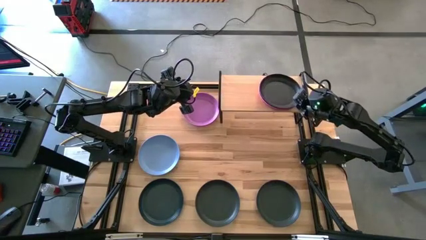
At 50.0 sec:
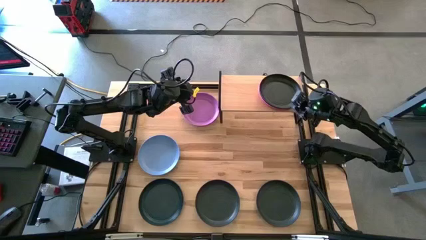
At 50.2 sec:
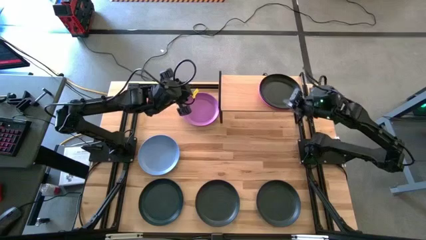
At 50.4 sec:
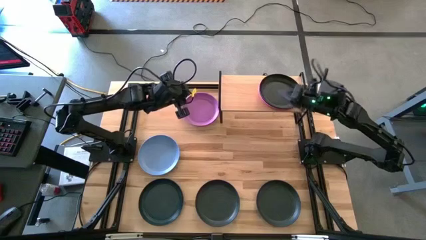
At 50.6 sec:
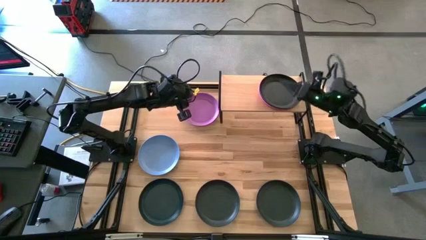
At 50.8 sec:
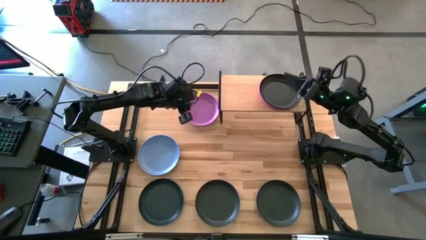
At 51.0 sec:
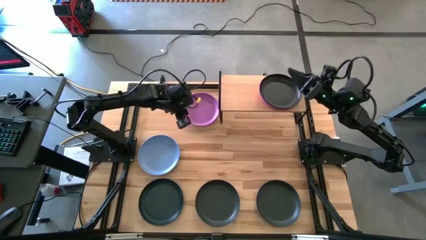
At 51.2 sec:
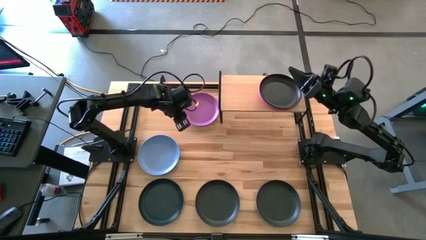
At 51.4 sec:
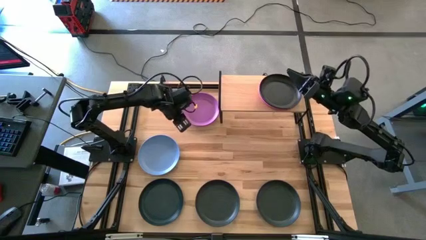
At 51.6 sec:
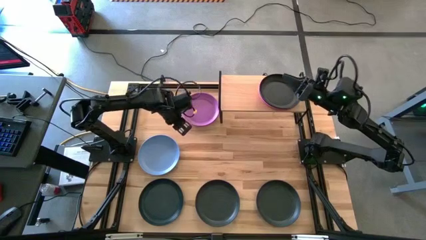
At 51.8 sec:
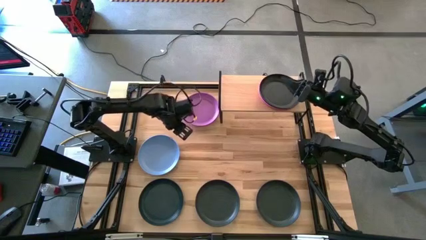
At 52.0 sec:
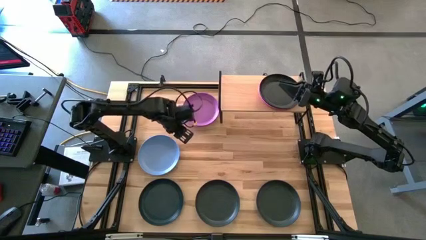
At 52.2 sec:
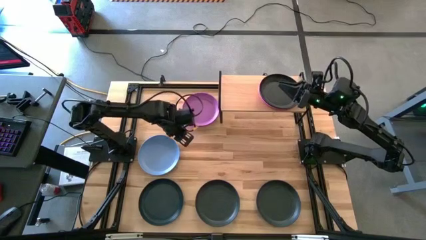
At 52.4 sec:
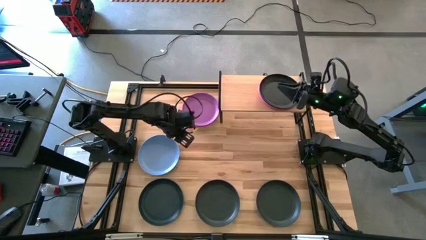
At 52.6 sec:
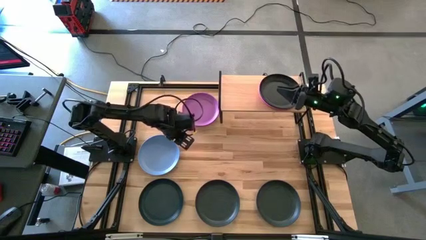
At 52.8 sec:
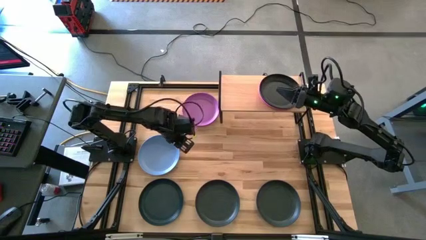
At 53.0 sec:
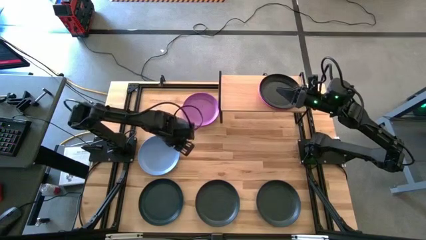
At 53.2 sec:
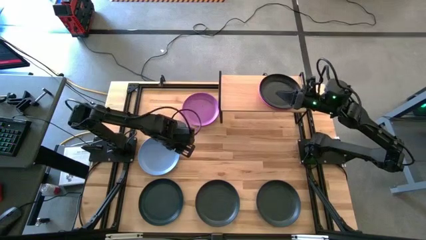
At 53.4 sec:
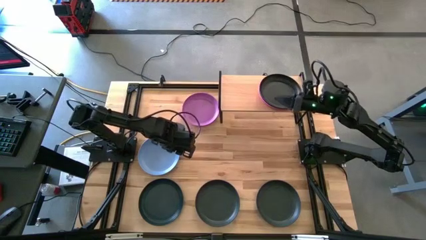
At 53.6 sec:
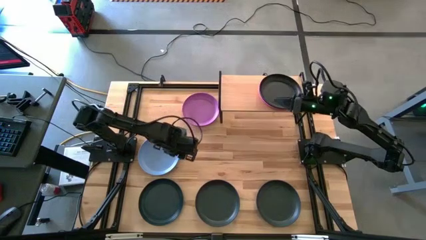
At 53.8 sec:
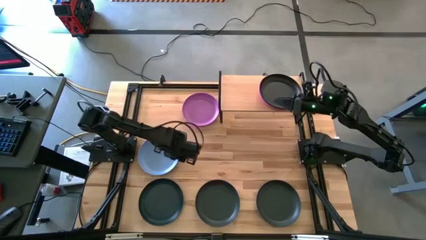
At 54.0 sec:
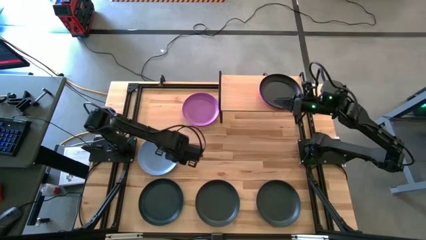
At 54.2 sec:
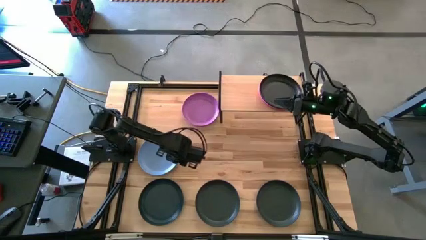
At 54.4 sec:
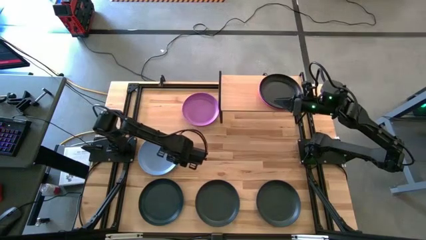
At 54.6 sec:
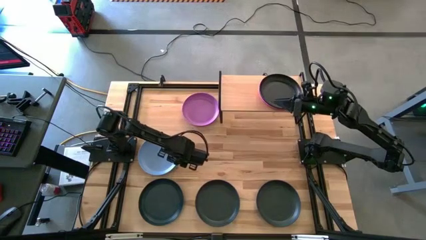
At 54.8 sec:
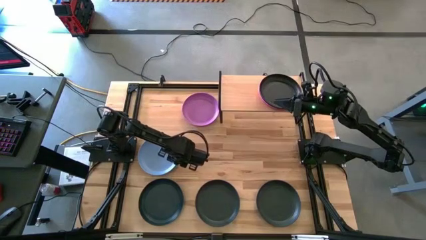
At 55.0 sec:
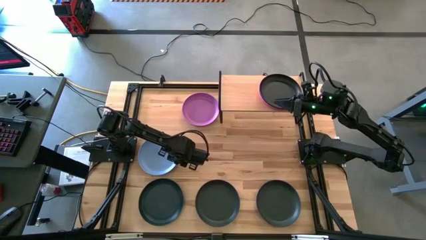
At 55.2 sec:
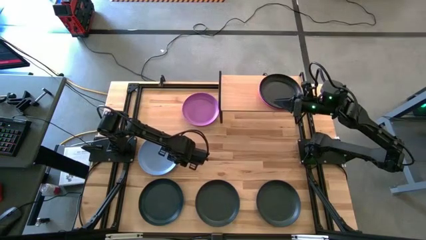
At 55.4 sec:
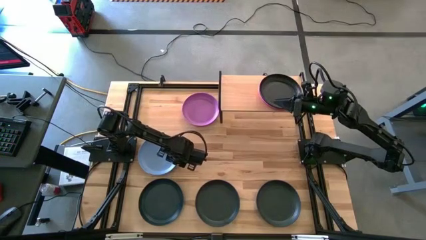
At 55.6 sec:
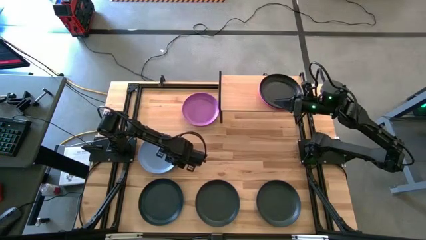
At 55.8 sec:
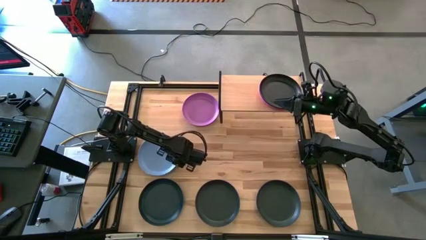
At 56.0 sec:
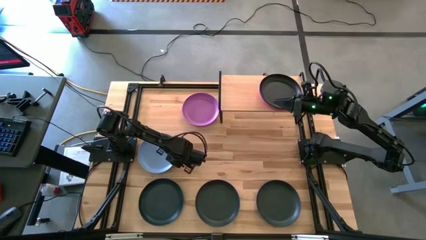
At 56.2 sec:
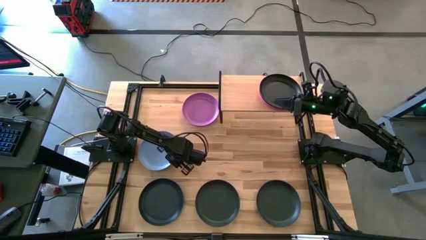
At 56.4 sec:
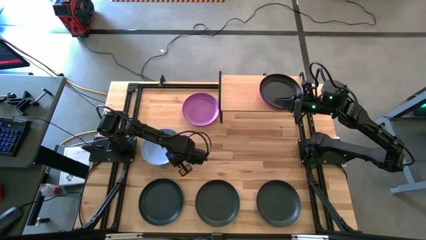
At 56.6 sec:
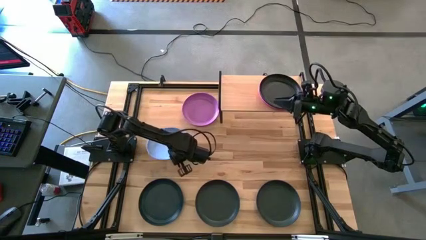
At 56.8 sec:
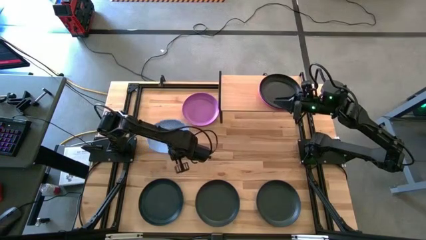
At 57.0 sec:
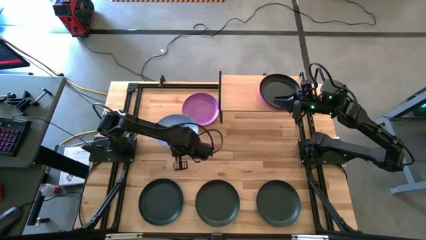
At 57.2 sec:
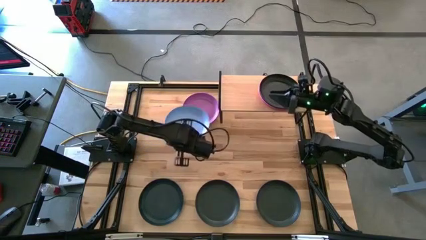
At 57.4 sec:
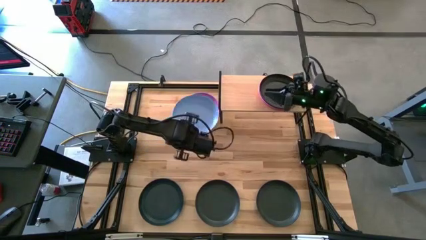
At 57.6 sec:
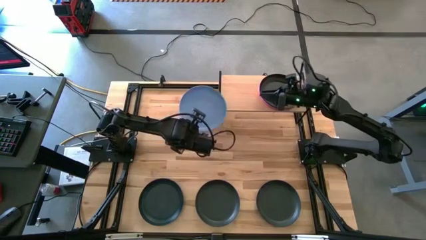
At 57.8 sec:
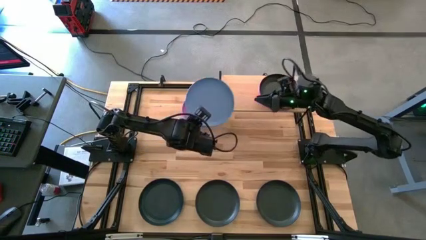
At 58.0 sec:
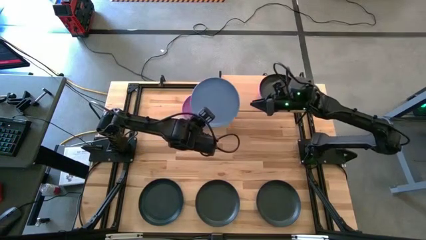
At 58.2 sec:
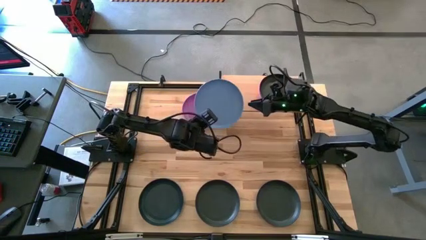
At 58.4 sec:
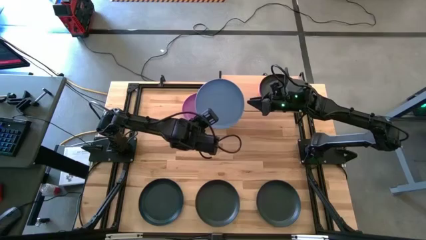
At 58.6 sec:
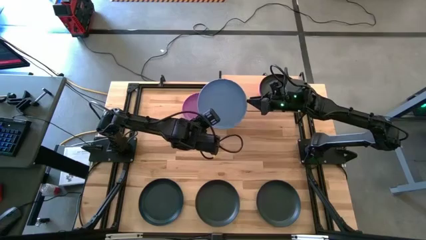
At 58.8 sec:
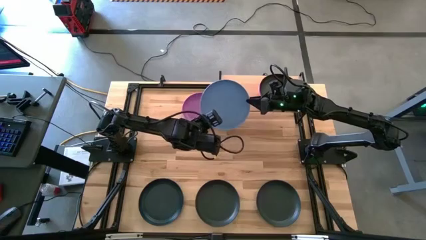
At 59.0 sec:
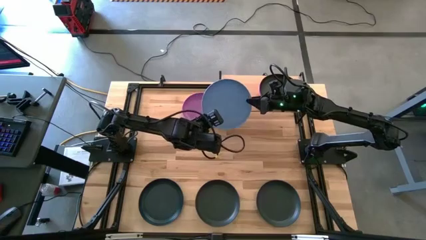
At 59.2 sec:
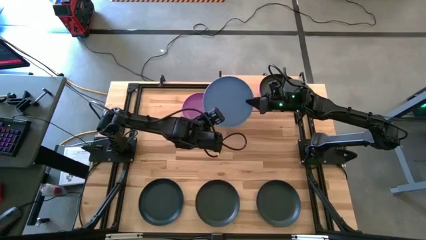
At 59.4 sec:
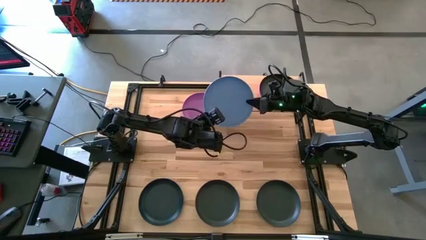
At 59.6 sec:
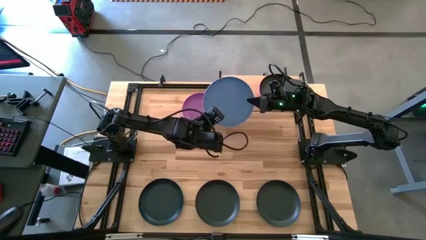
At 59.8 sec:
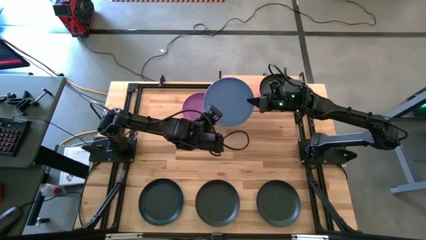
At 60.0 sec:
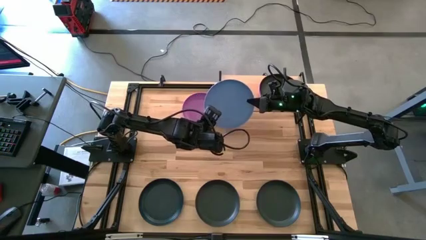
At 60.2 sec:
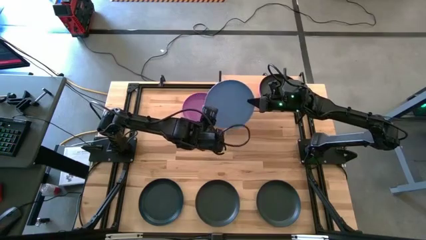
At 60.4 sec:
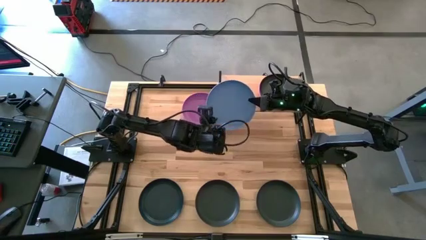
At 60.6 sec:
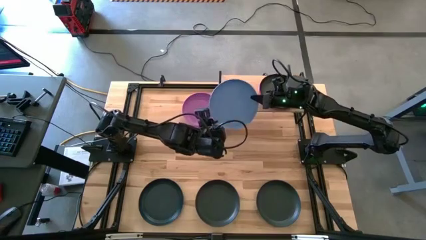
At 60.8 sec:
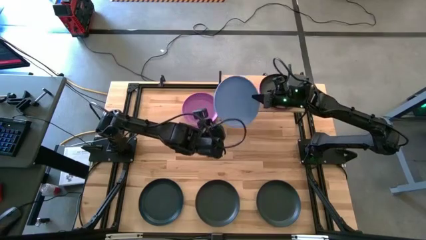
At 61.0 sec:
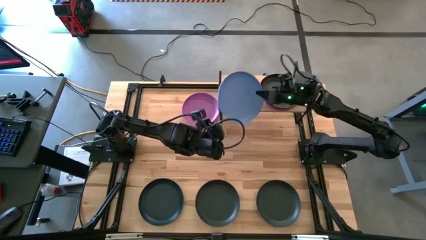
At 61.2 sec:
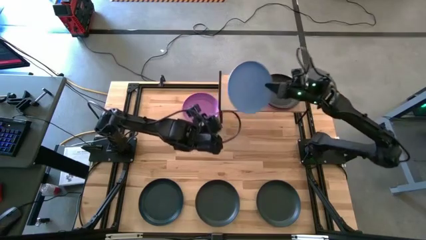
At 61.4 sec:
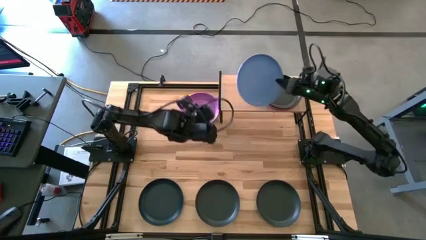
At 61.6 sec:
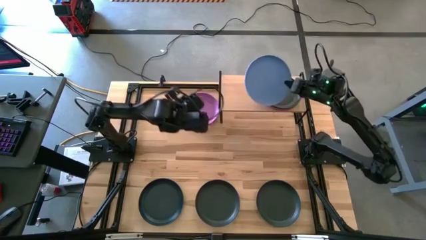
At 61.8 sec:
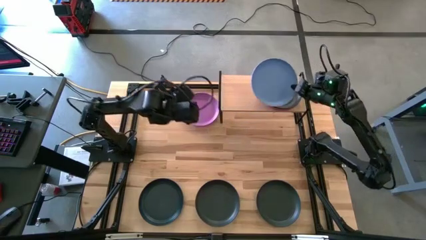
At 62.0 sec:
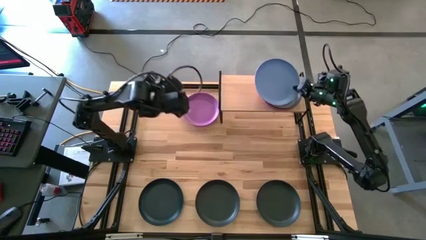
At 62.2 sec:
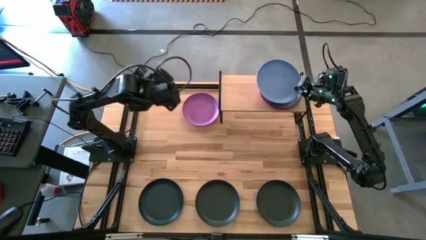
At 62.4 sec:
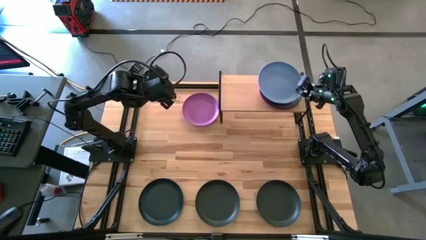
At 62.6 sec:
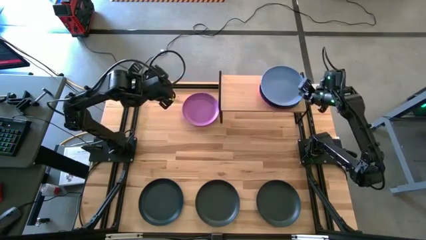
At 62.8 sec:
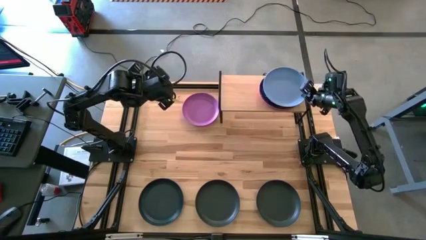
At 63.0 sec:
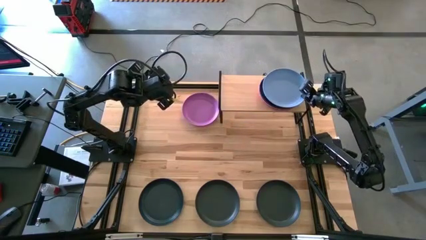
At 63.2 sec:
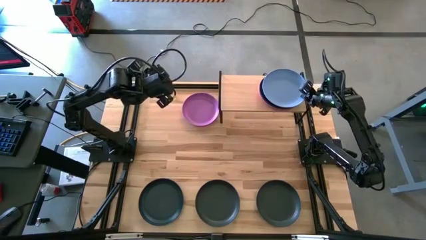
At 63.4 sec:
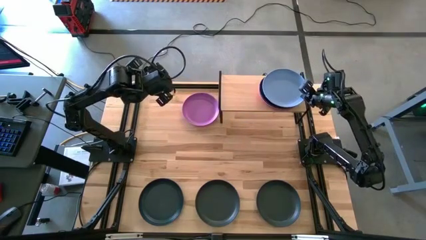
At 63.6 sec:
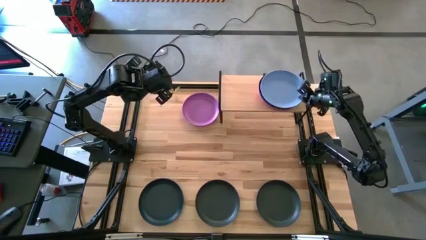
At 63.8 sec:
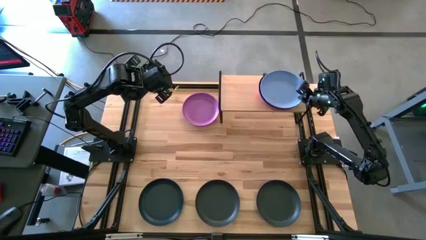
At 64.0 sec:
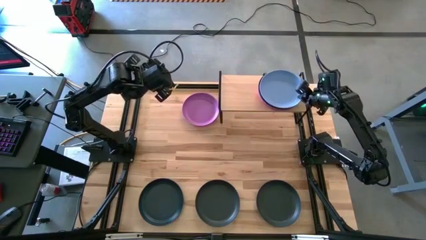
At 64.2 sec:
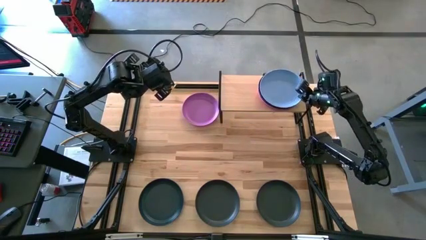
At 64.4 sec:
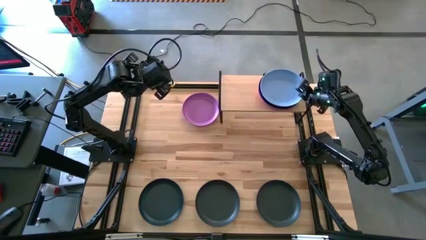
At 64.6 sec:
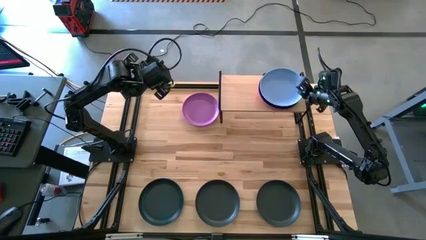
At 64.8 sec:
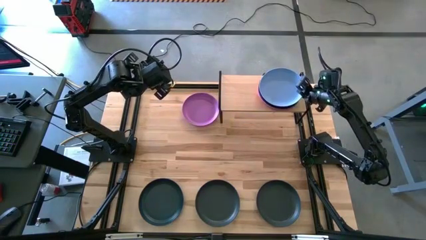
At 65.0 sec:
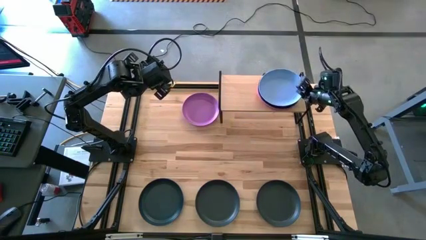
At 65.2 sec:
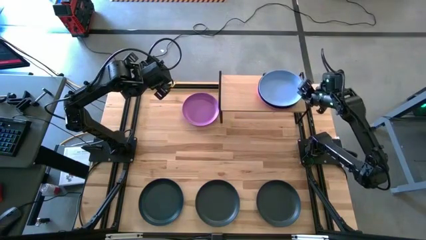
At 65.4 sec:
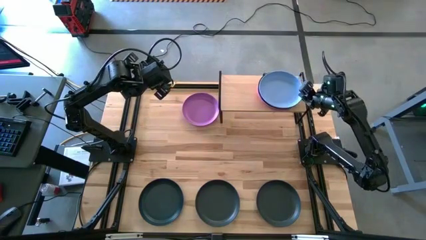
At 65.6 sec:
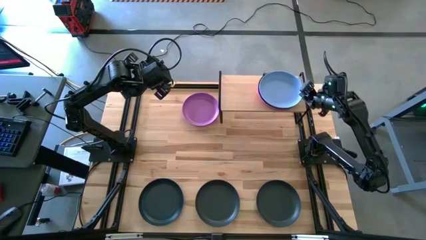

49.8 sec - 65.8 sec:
Task: Place and stack plates onto a shelf
Stack the blue plate on top of the black plate on the shelf
